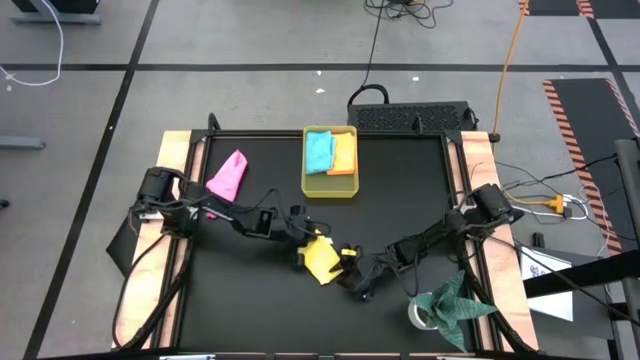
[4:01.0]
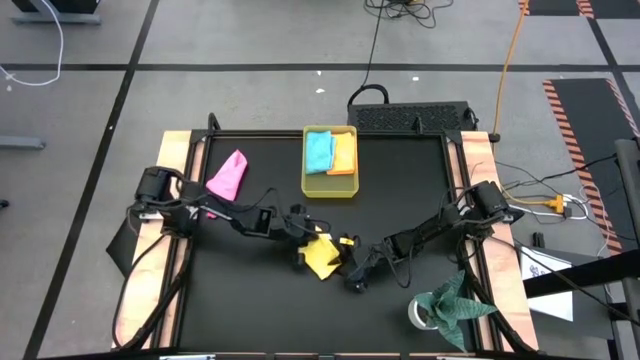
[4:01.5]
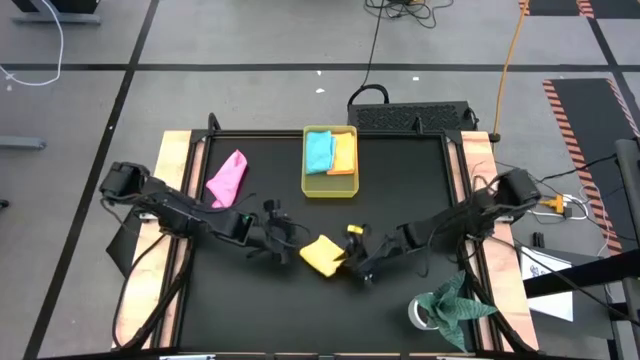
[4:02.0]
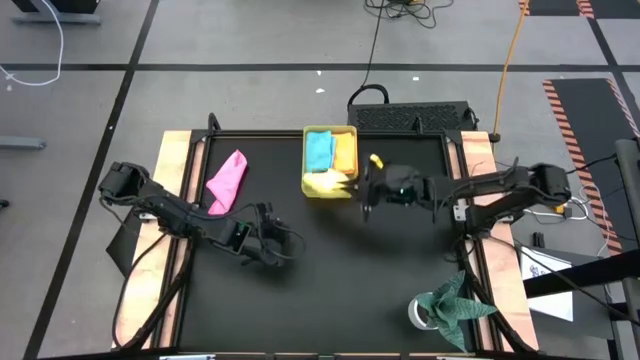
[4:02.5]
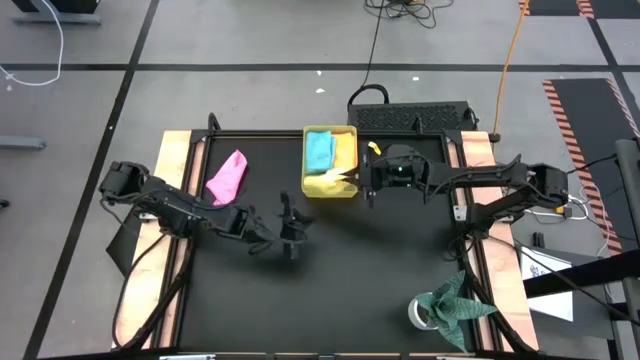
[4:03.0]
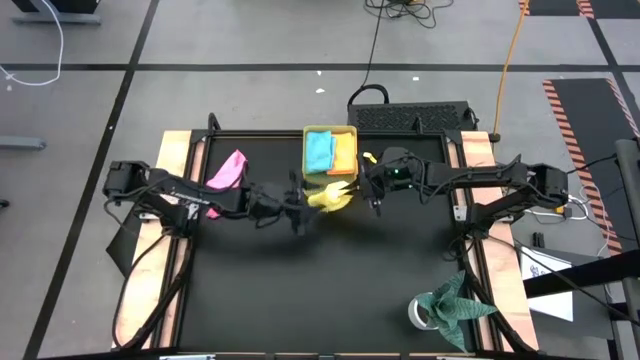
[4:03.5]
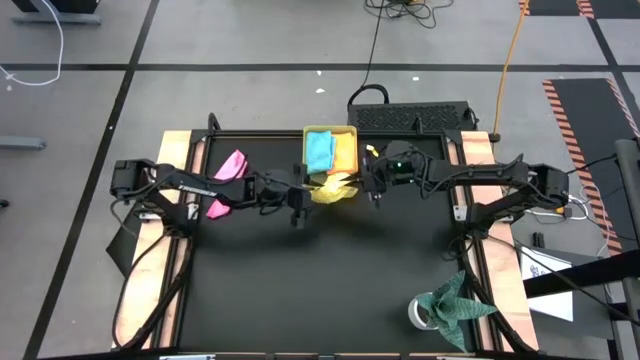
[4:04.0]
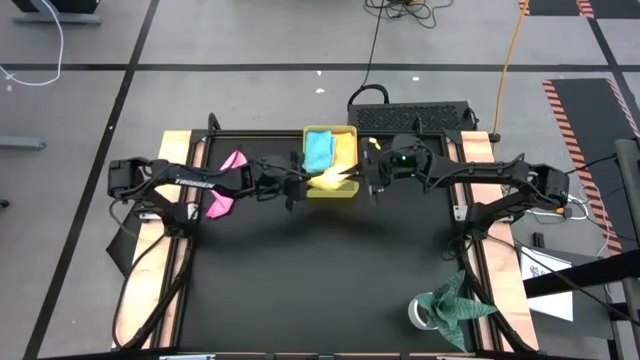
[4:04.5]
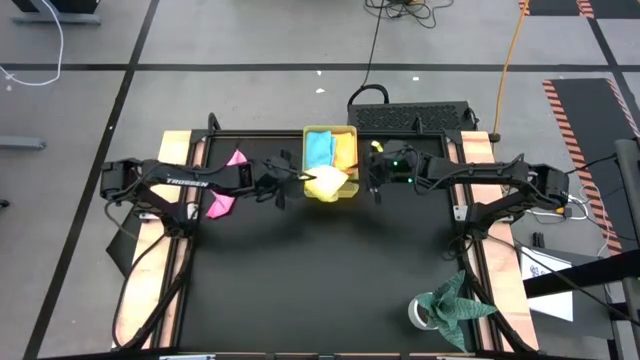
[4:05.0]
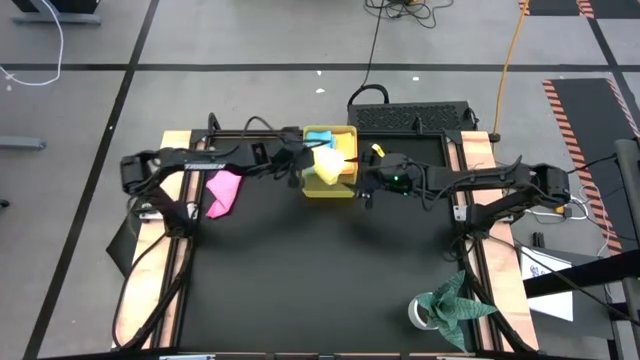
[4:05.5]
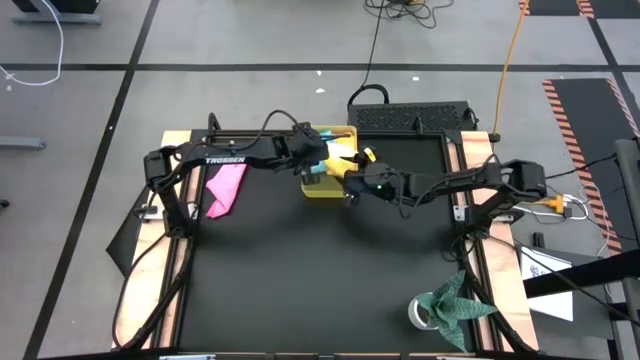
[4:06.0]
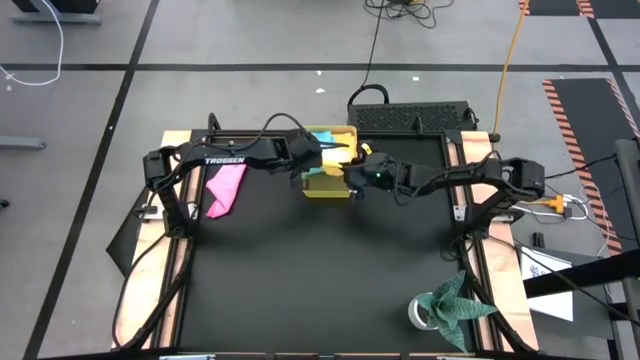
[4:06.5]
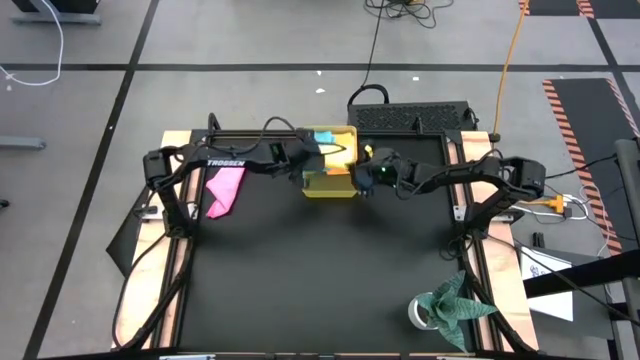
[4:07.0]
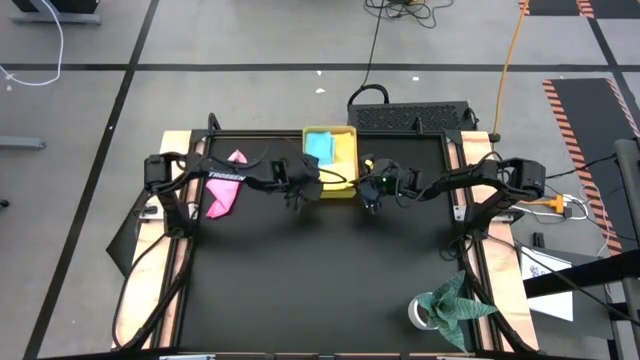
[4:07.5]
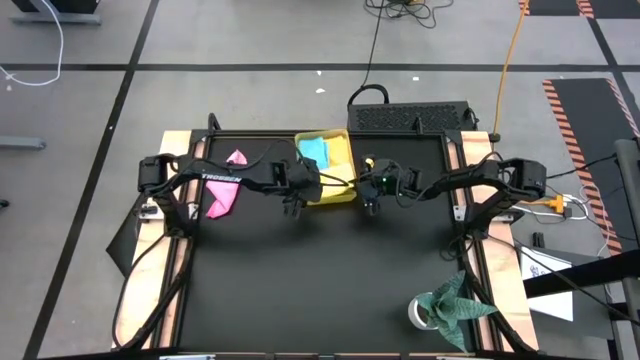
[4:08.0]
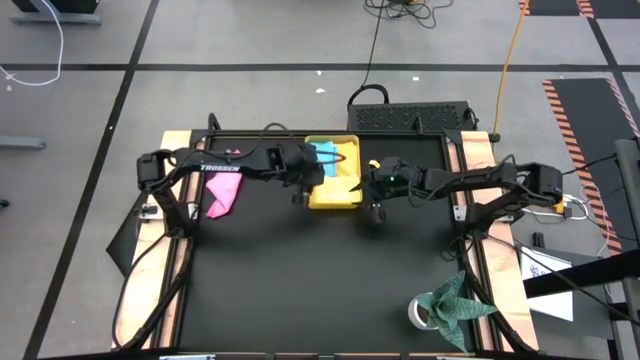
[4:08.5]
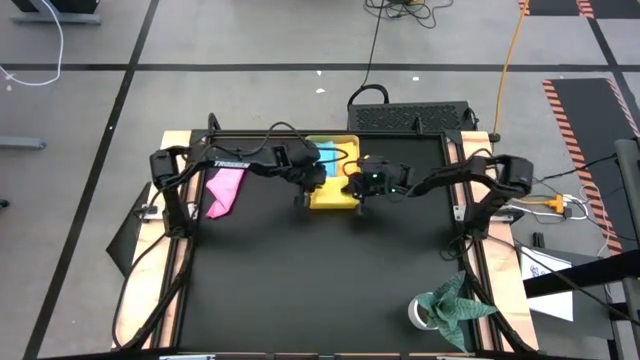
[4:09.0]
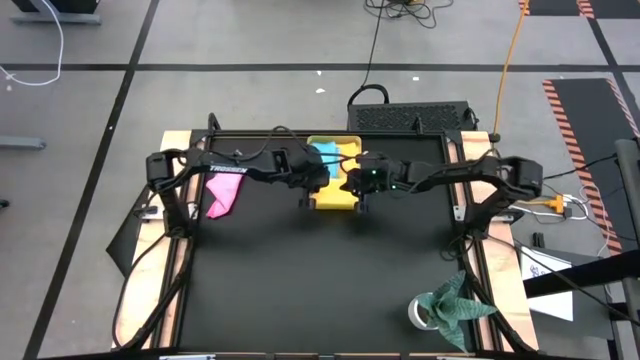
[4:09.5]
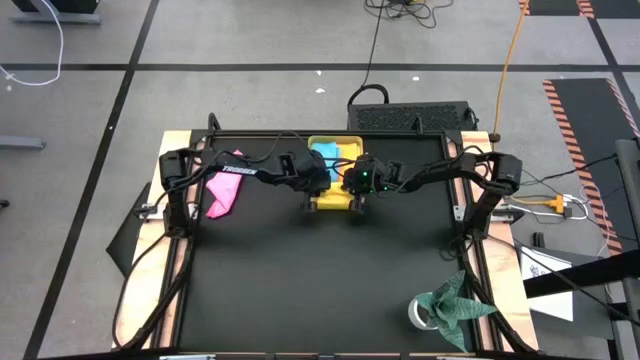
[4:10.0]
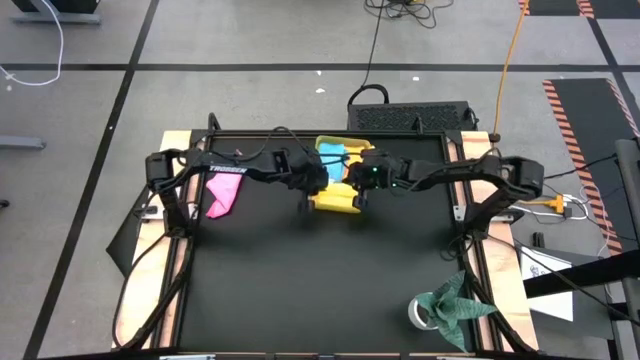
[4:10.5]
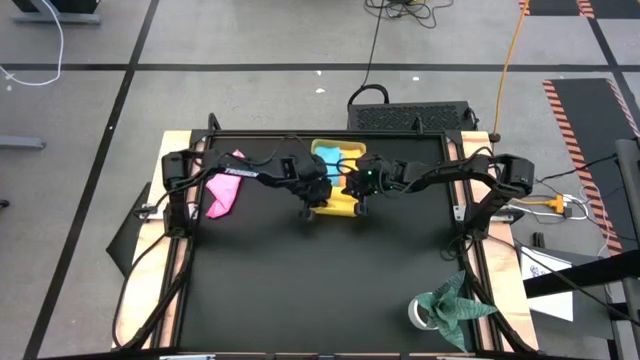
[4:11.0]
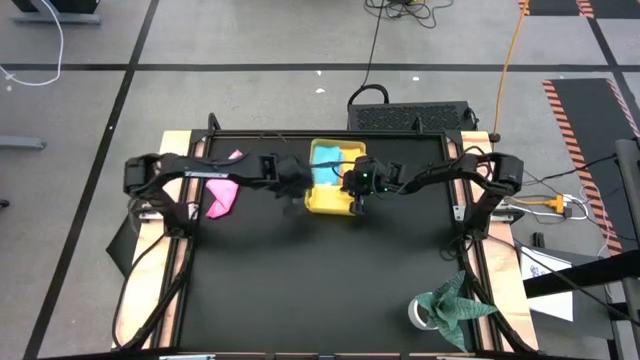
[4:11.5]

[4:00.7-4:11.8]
Task: Fold microfiber towels
Put the yellow towel into the yellow bin

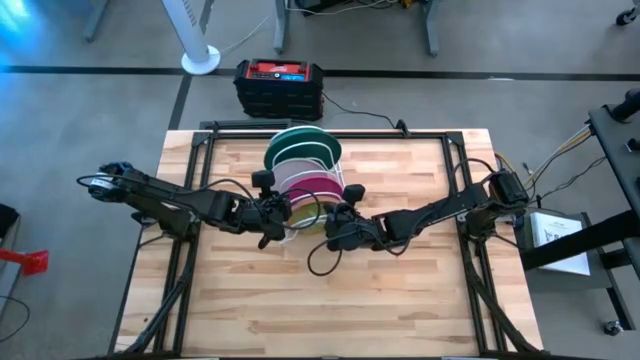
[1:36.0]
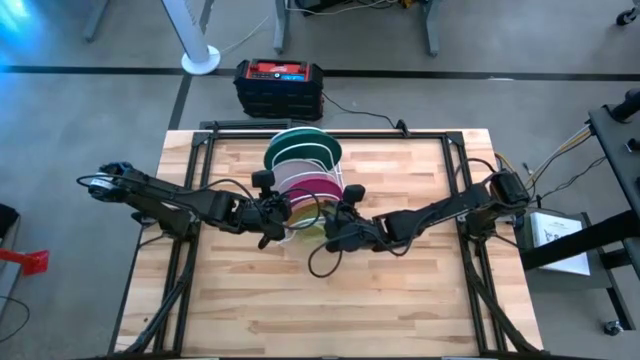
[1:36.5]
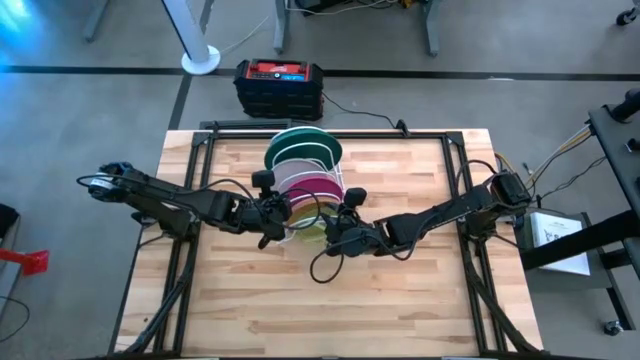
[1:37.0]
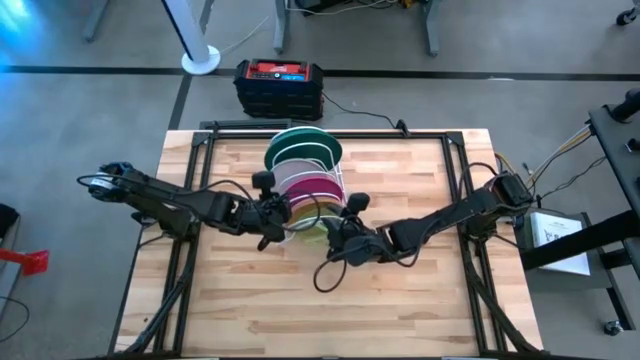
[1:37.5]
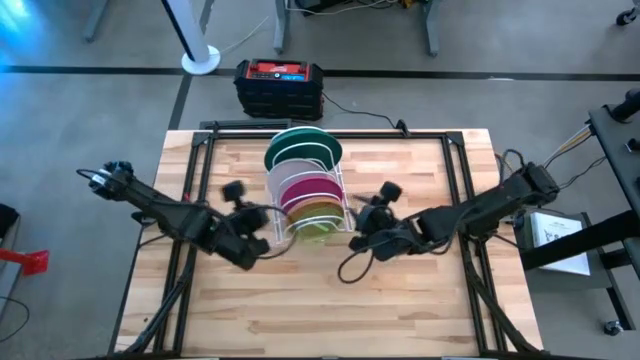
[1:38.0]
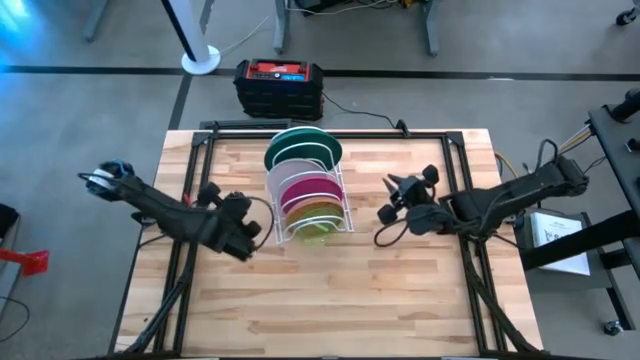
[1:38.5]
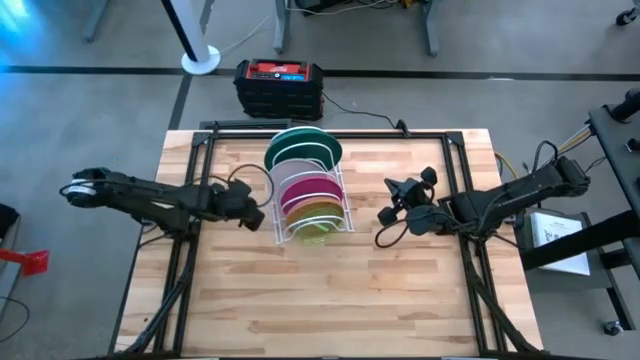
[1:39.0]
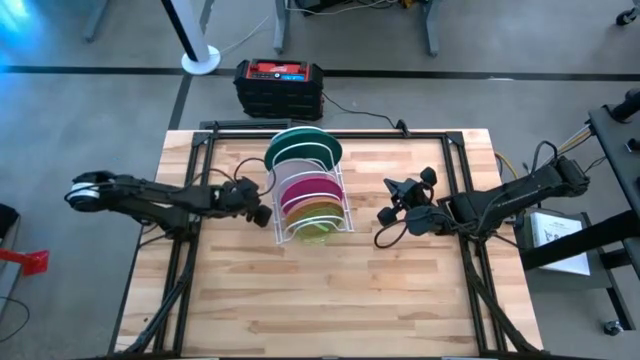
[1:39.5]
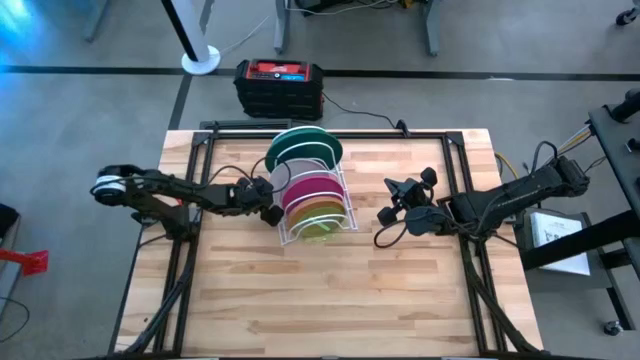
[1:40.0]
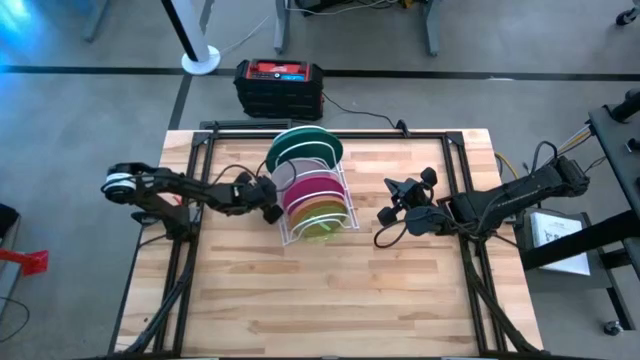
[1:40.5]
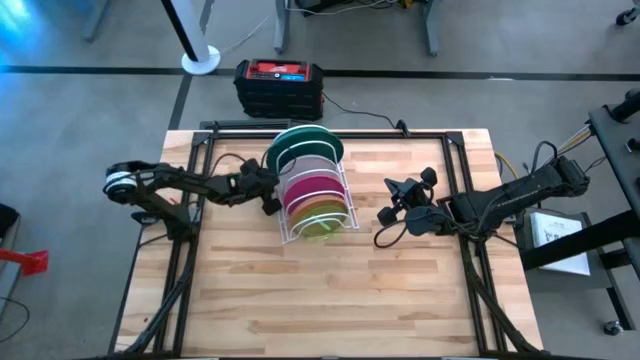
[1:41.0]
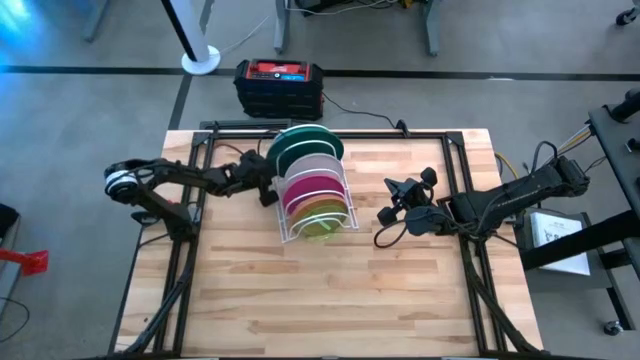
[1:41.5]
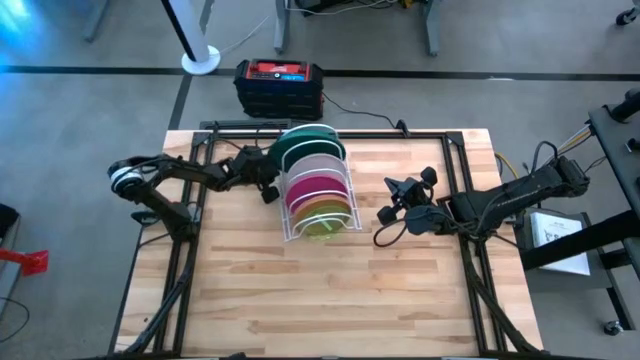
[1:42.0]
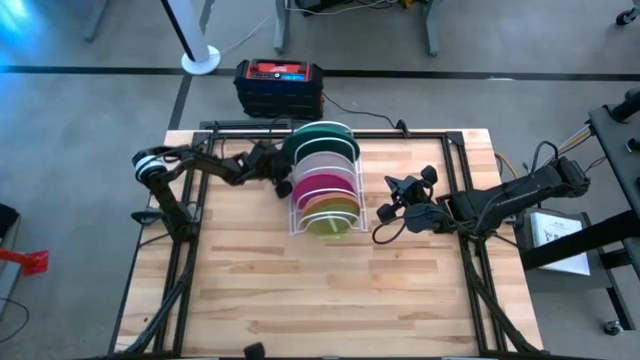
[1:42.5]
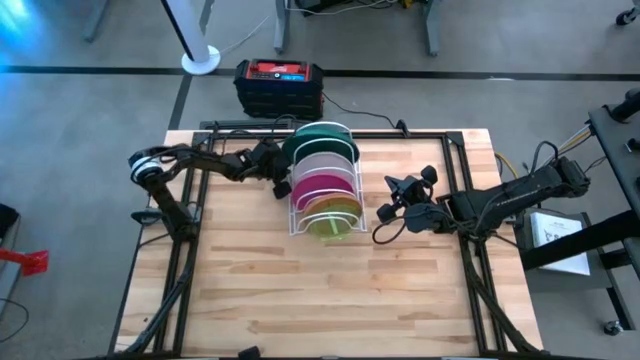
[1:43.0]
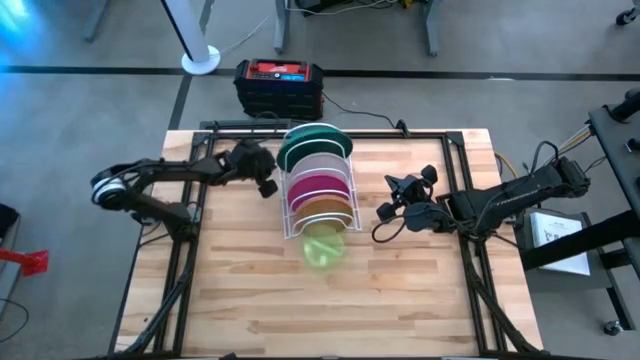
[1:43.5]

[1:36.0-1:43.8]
Task: Sort dishes
Adjust the dish rack
